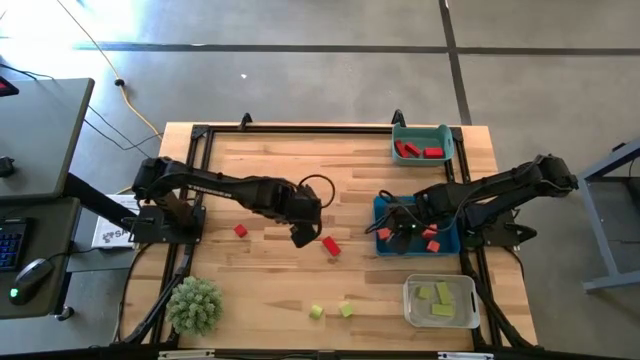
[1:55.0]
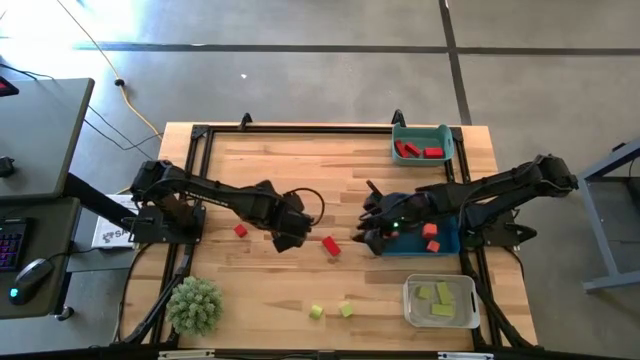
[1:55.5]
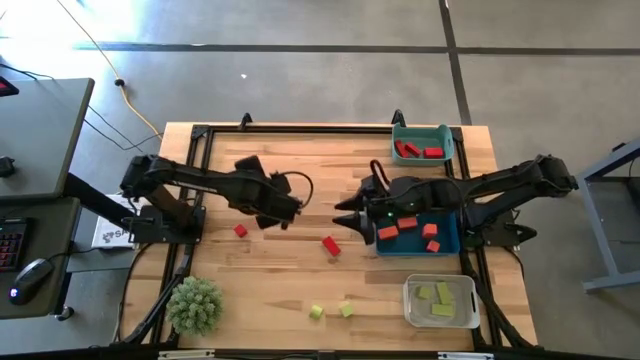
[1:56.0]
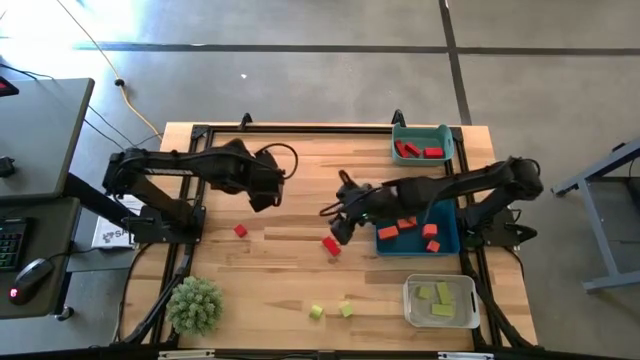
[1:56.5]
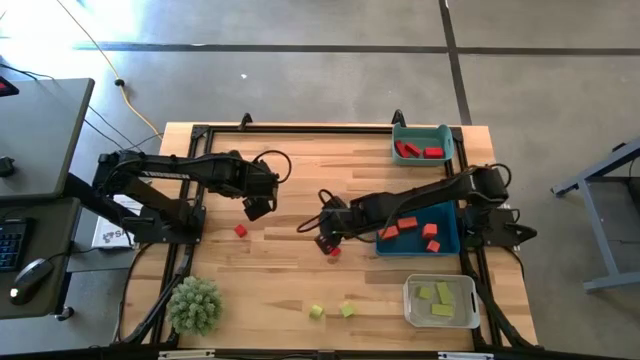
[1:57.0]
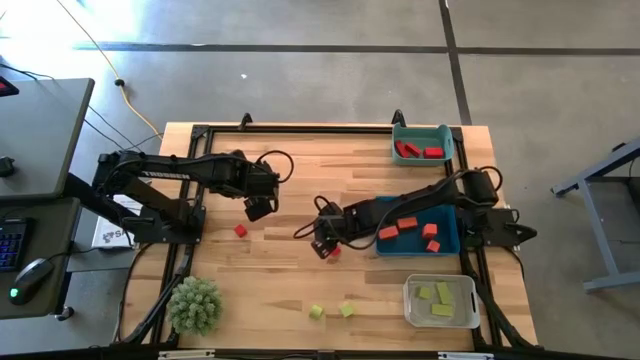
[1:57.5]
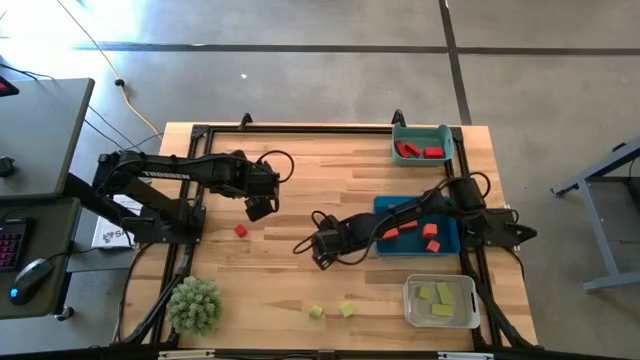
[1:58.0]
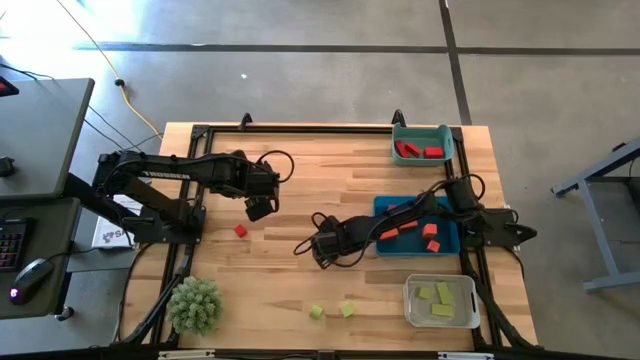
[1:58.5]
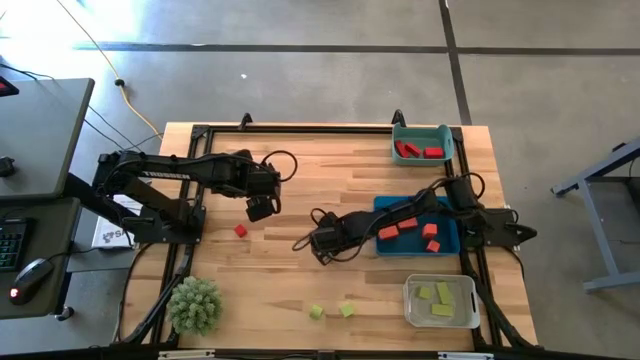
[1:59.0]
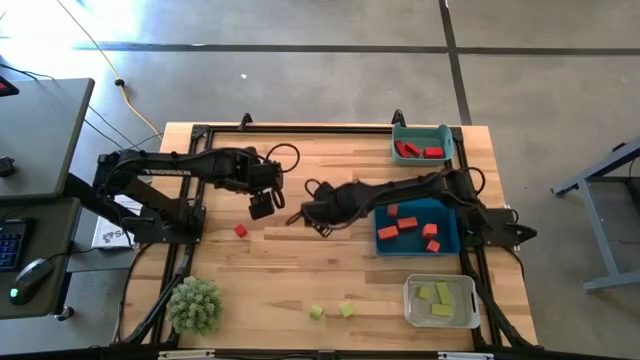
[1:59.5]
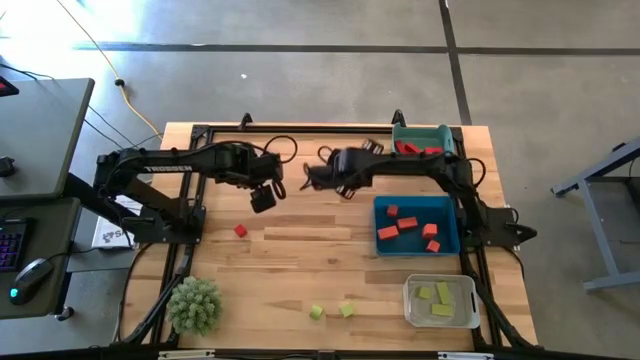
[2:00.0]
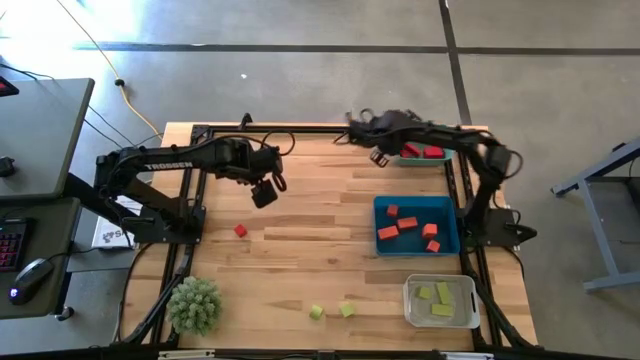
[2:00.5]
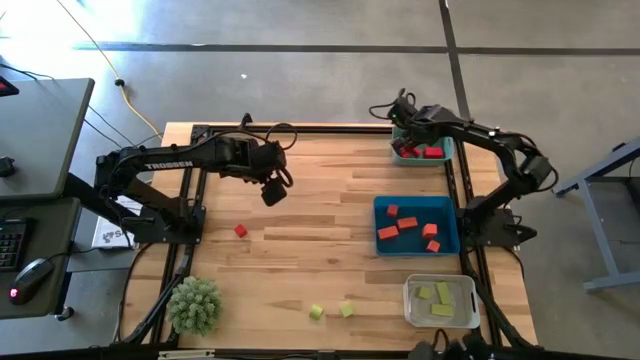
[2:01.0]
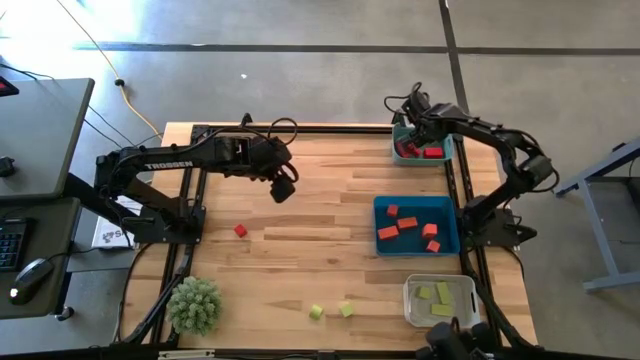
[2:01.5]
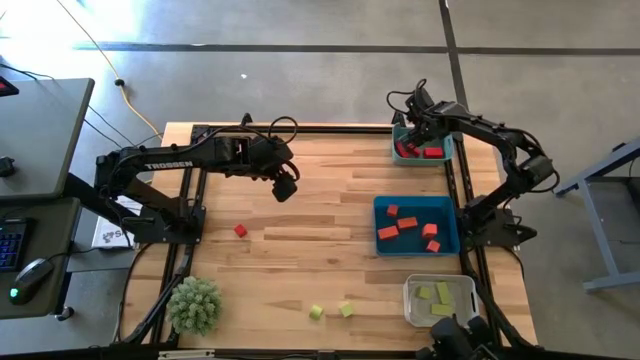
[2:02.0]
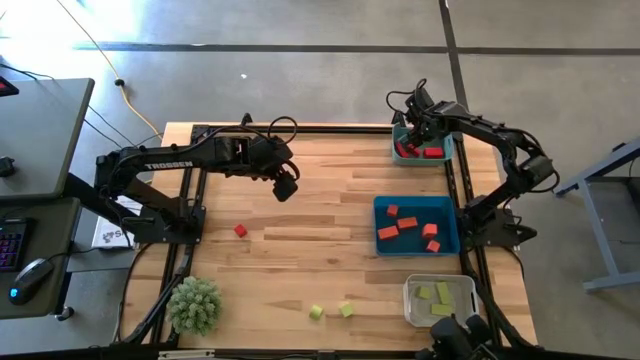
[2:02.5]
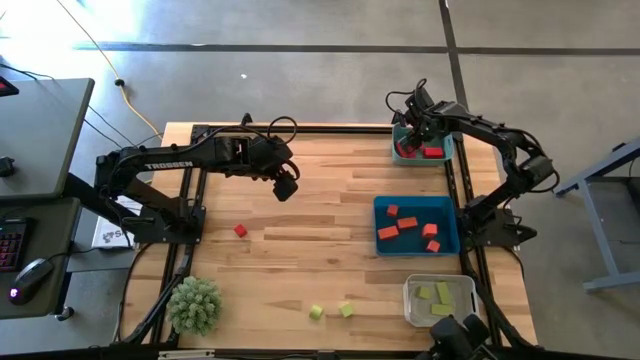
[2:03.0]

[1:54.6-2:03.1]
Task: Sort & place blocks by color
Put the red wooden block into the green bin

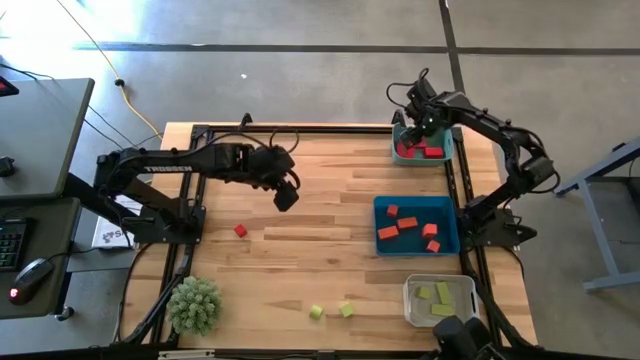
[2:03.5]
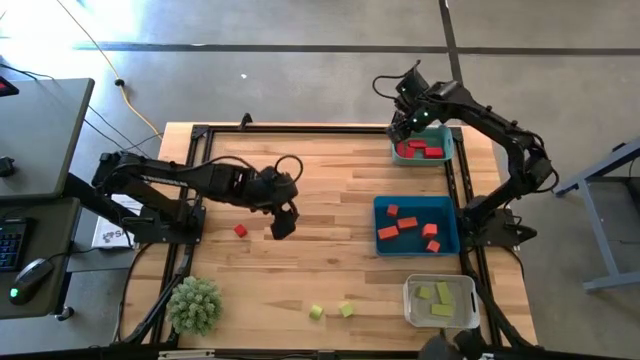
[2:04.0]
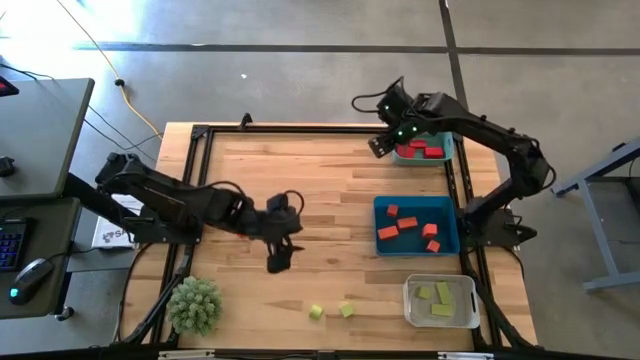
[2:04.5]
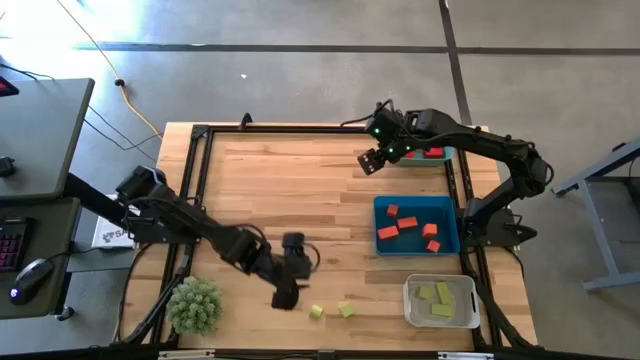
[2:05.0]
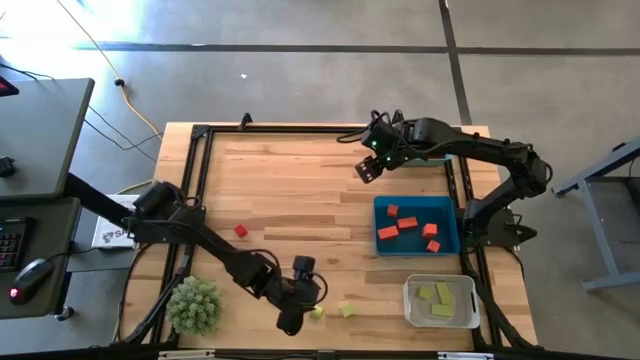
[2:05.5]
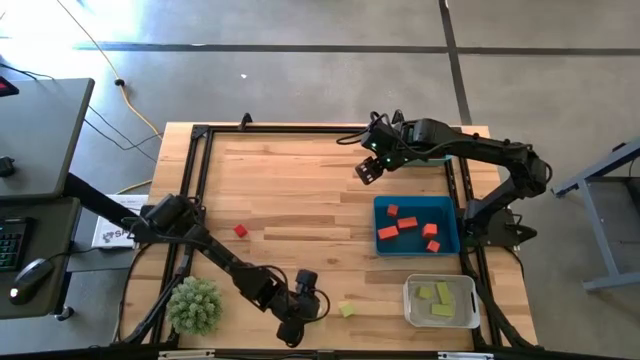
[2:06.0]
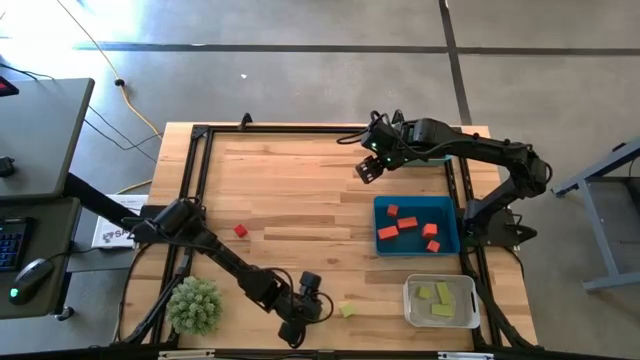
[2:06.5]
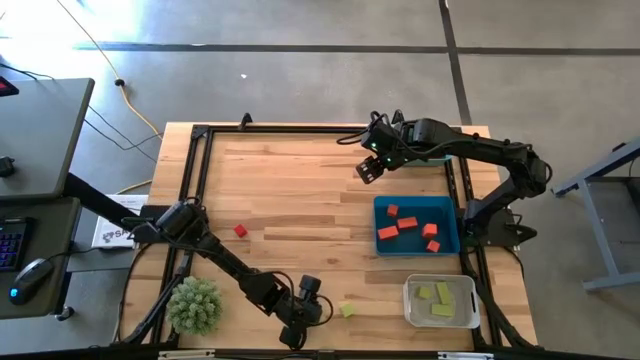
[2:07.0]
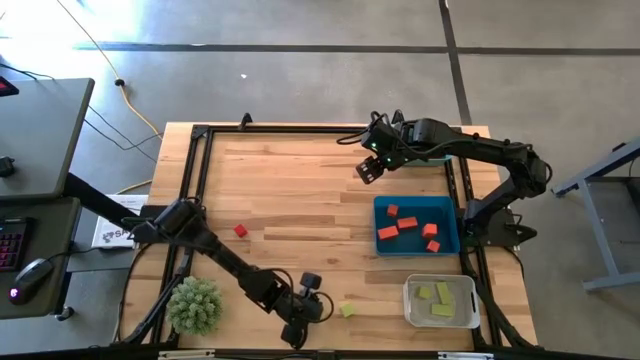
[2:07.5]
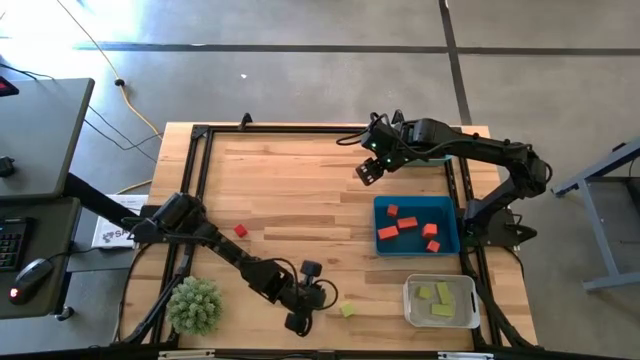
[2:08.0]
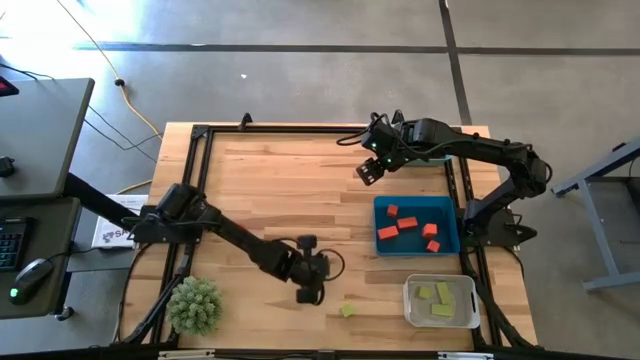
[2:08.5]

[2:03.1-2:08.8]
Put the green wooden block into the white bin

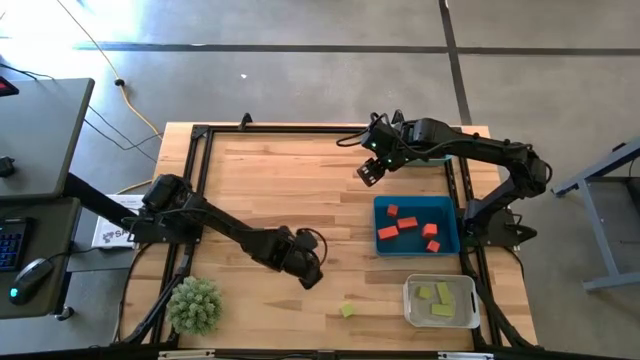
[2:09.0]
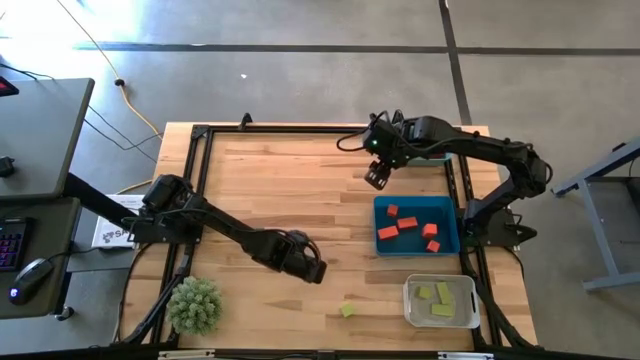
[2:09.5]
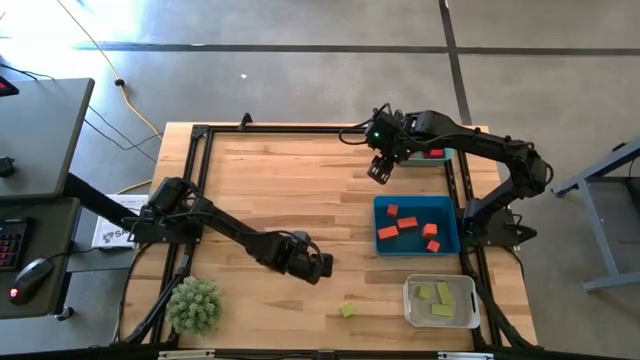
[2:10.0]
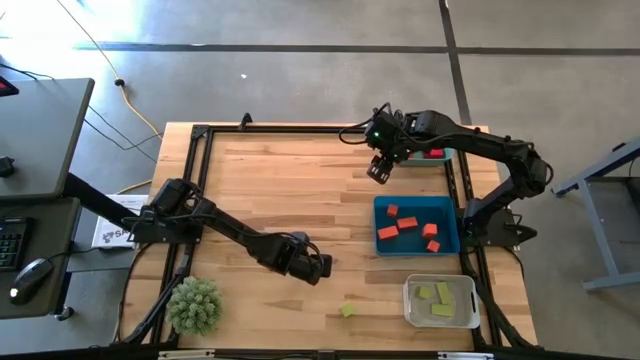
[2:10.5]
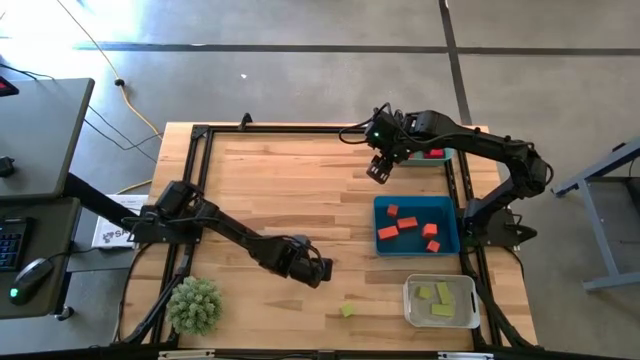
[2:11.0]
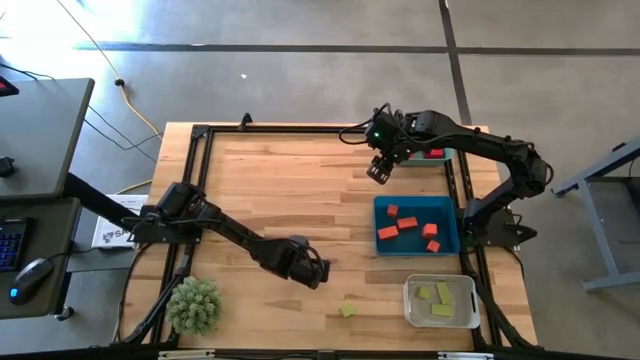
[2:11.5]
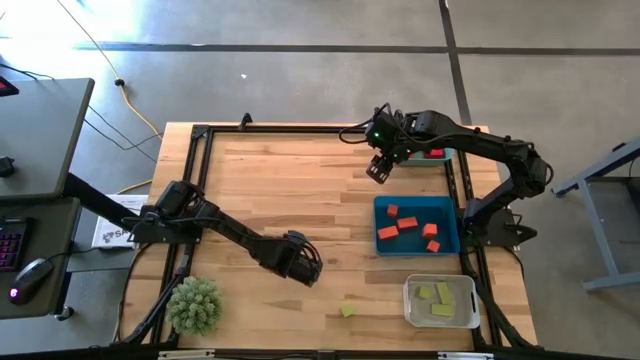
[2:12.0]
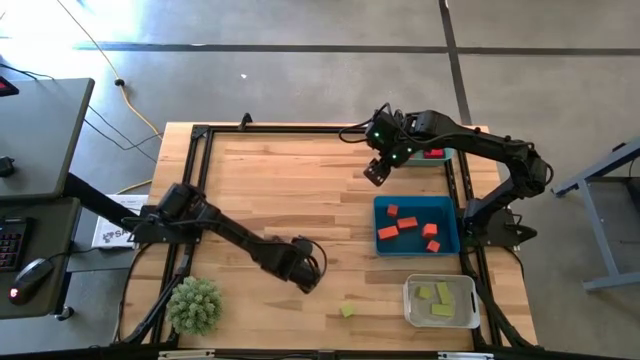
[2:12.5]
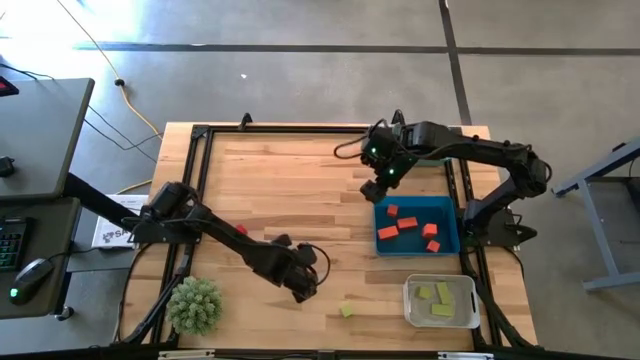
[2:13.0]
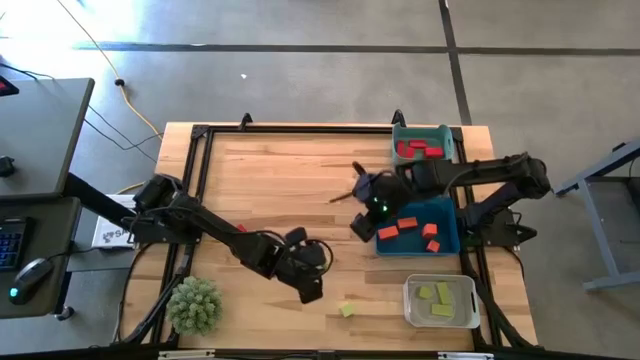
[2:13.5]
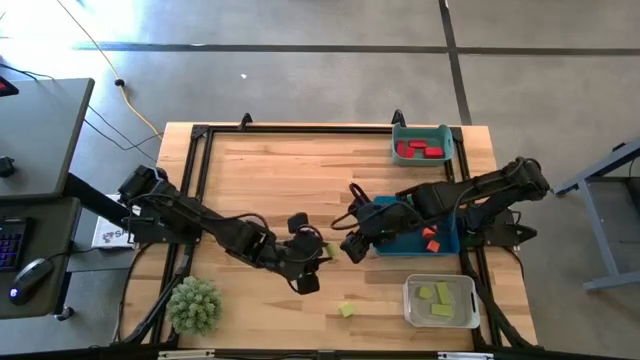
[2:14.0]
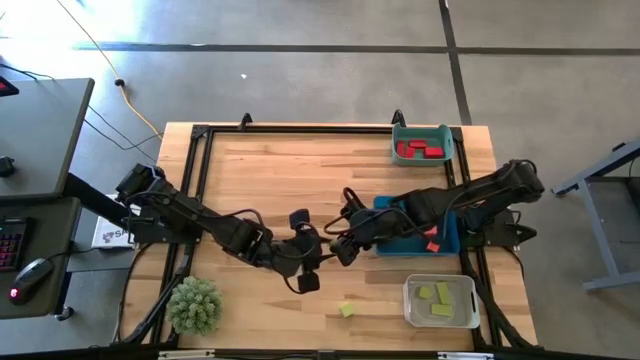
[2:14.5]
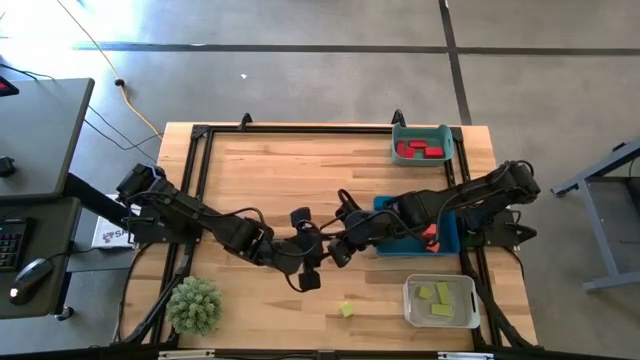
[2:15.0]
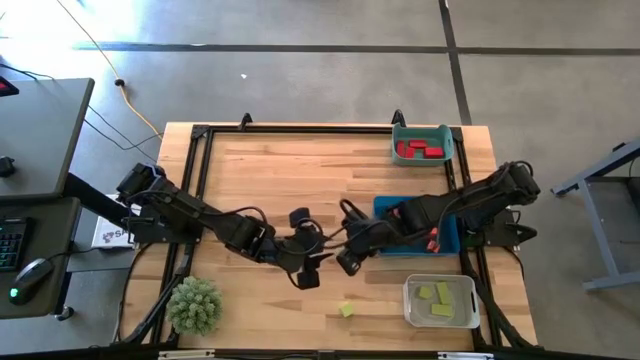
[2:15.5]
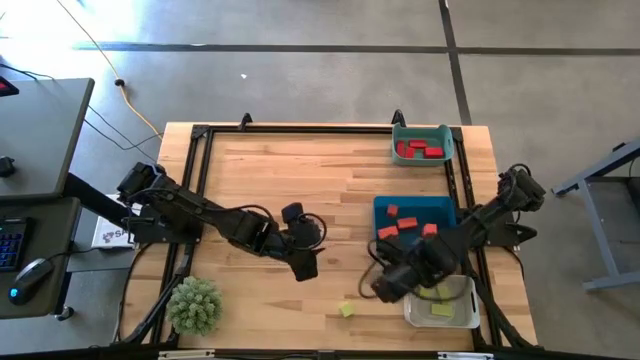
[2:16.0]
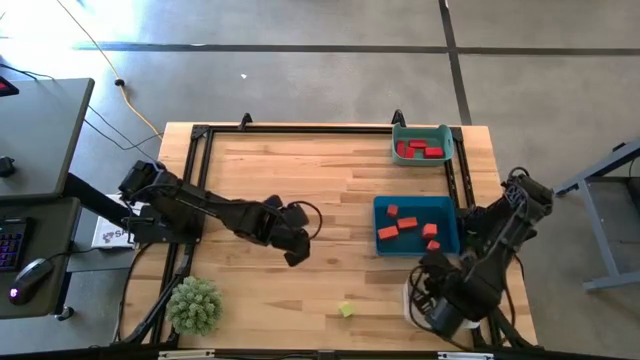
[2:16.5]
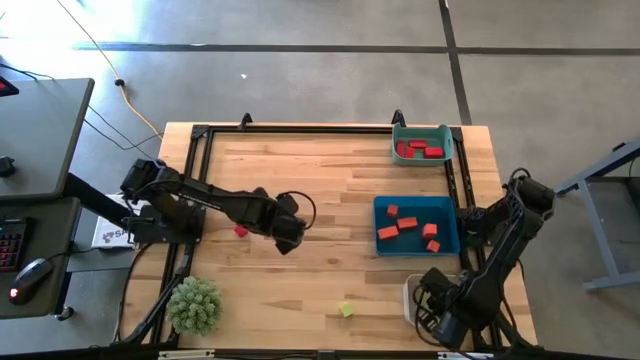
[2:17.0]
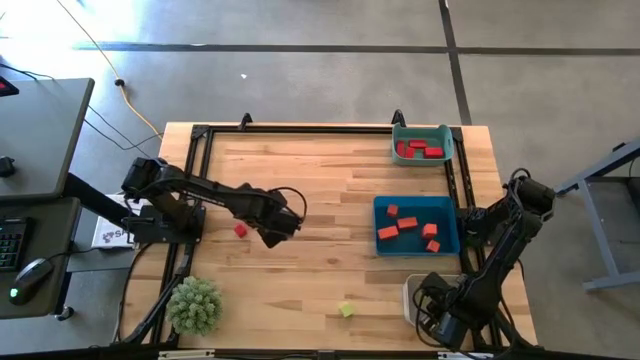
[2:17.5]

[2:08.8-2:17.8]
Put the green wooden block into the white bin
